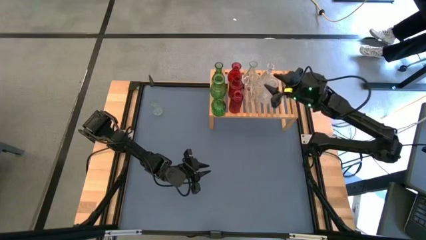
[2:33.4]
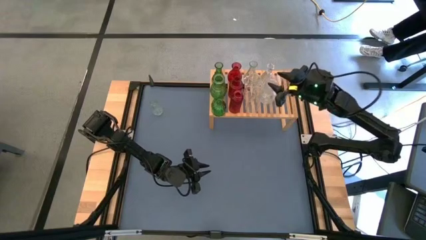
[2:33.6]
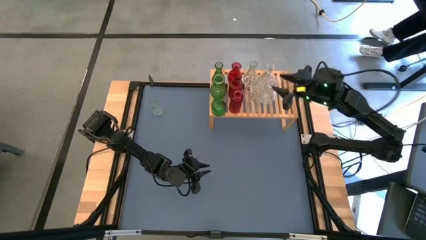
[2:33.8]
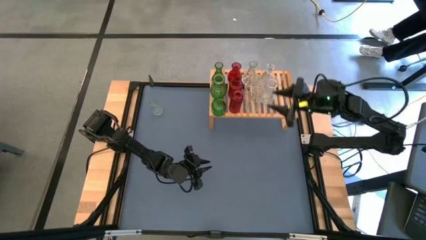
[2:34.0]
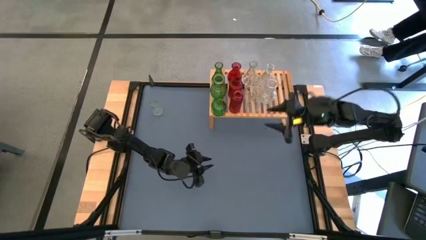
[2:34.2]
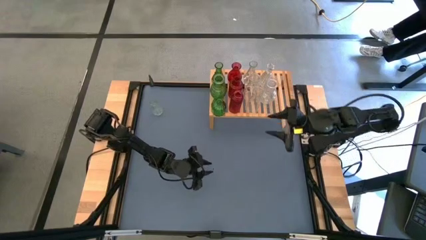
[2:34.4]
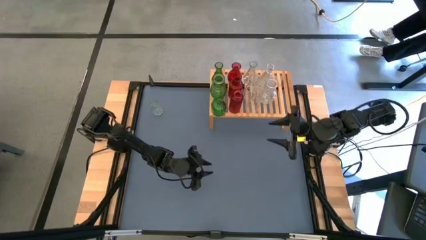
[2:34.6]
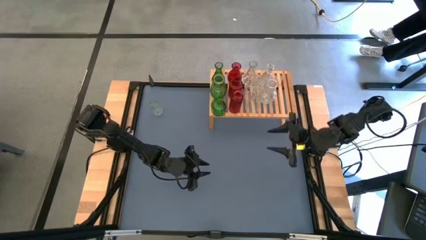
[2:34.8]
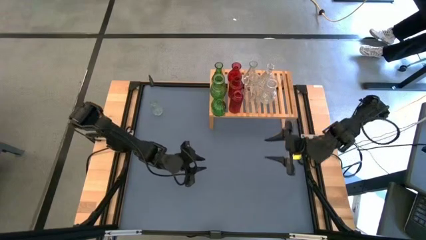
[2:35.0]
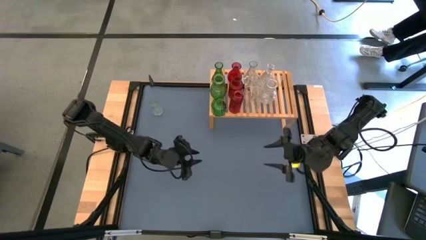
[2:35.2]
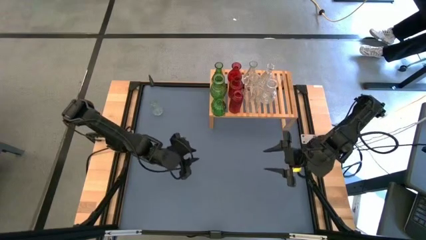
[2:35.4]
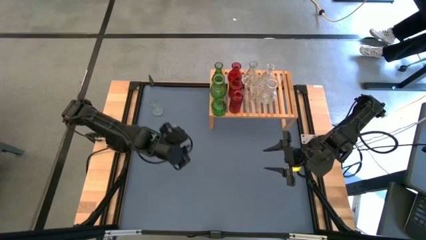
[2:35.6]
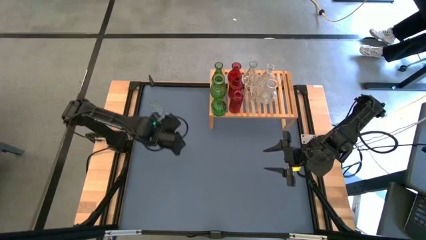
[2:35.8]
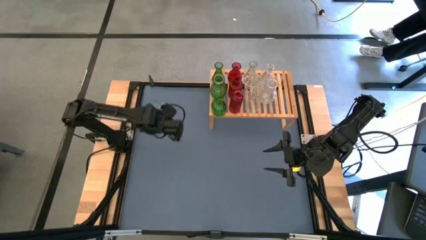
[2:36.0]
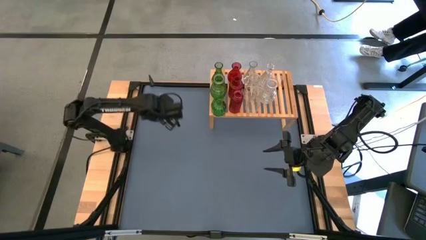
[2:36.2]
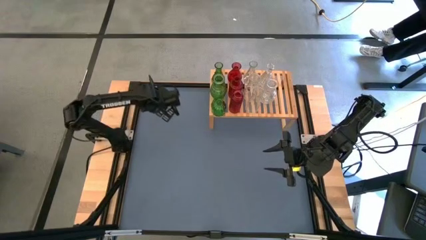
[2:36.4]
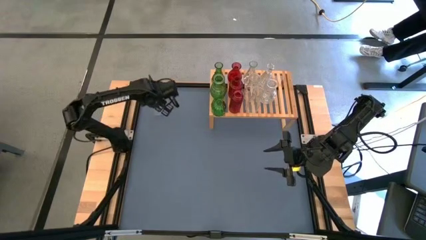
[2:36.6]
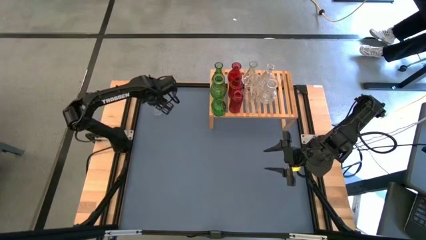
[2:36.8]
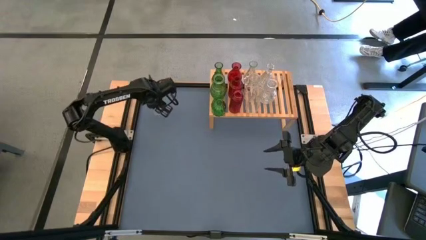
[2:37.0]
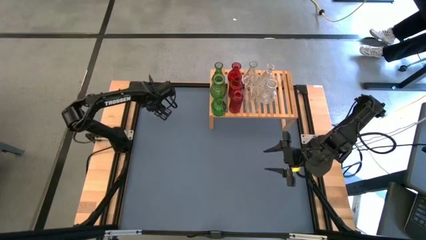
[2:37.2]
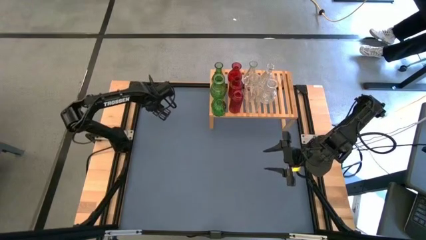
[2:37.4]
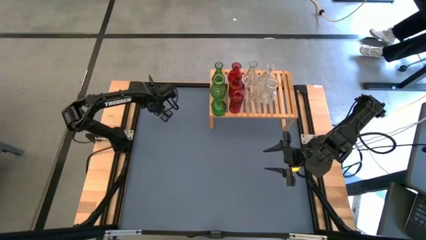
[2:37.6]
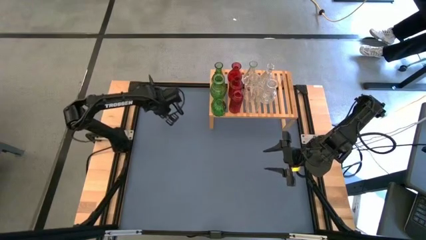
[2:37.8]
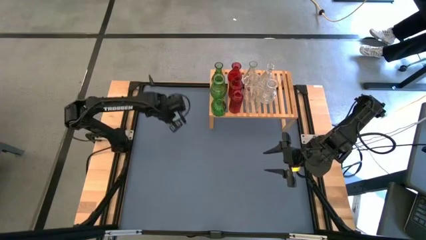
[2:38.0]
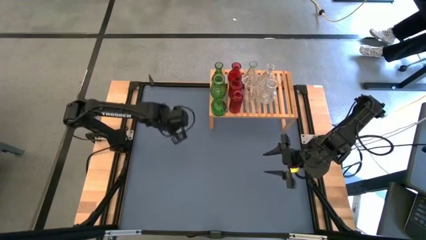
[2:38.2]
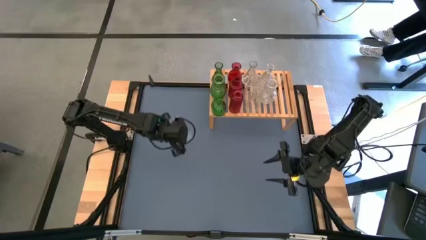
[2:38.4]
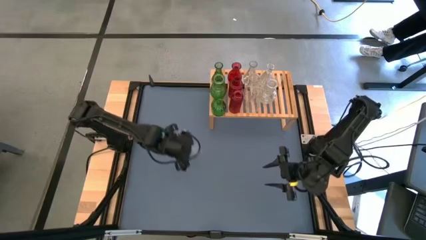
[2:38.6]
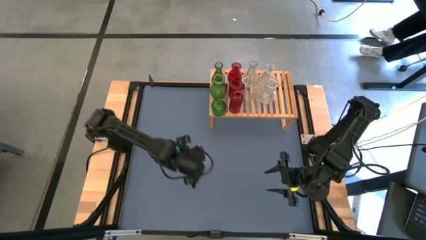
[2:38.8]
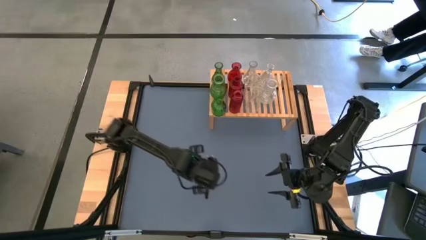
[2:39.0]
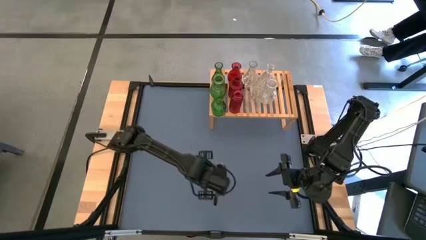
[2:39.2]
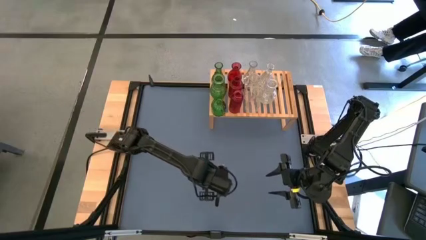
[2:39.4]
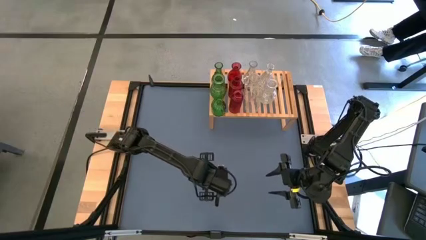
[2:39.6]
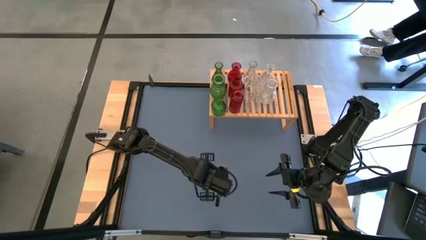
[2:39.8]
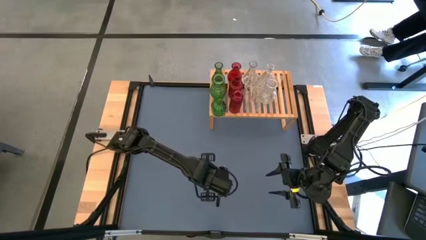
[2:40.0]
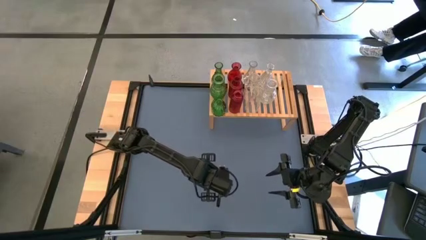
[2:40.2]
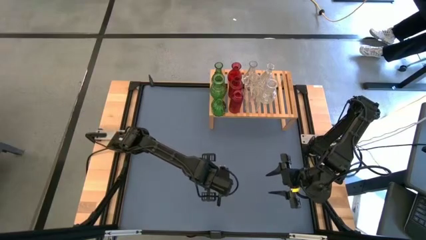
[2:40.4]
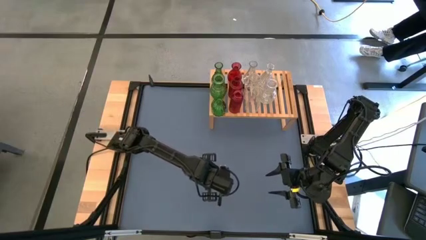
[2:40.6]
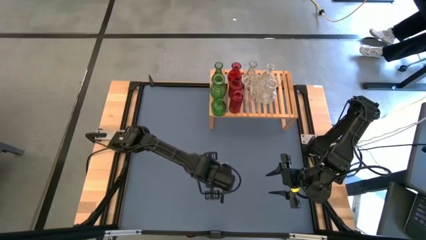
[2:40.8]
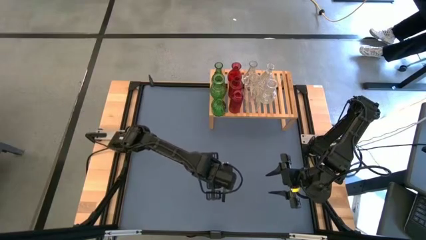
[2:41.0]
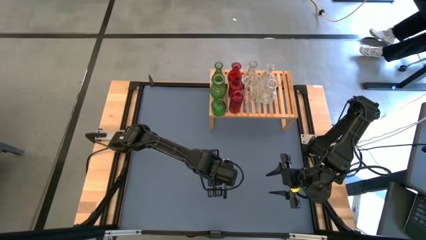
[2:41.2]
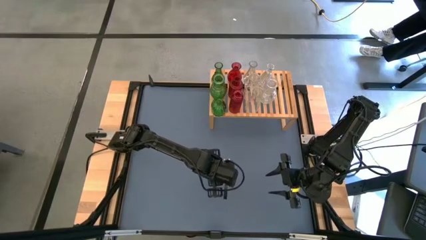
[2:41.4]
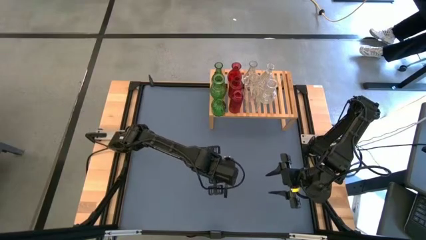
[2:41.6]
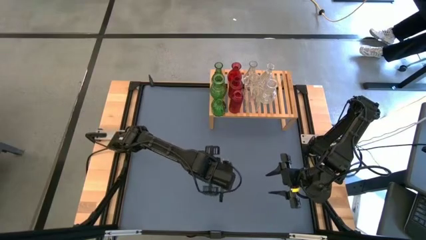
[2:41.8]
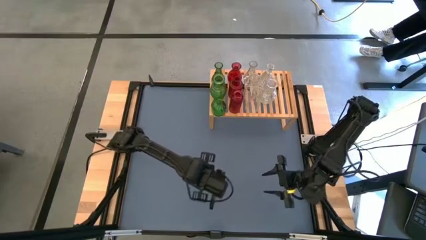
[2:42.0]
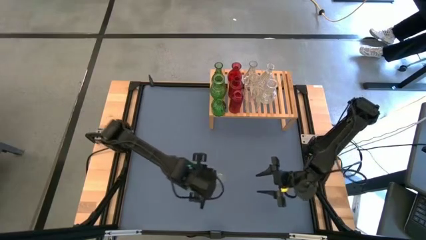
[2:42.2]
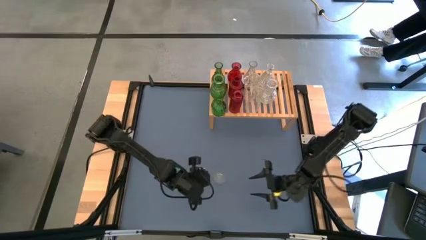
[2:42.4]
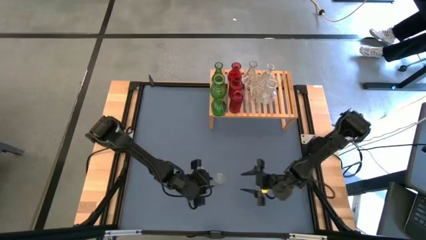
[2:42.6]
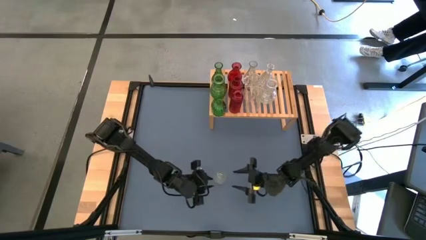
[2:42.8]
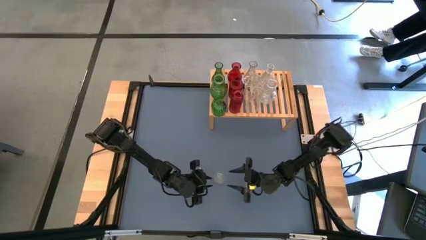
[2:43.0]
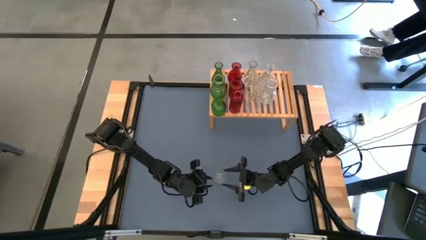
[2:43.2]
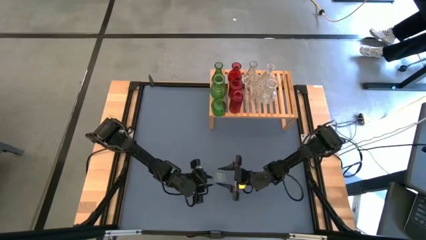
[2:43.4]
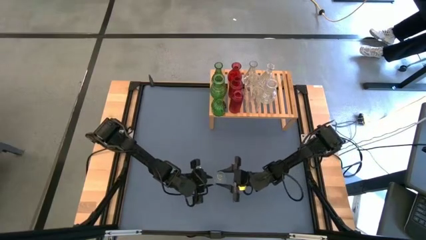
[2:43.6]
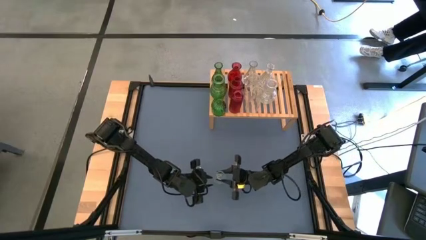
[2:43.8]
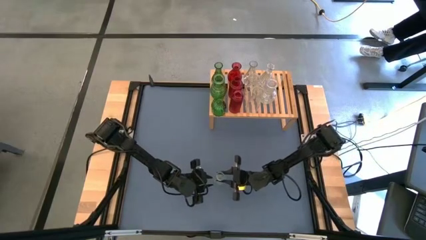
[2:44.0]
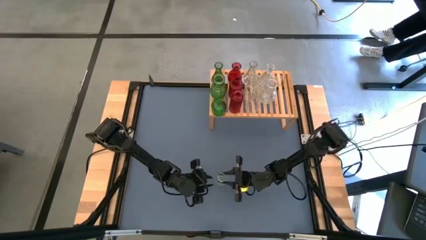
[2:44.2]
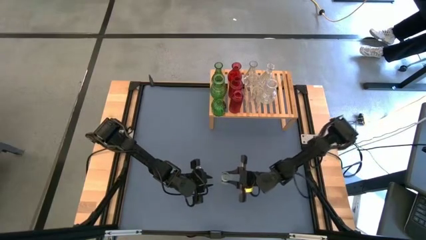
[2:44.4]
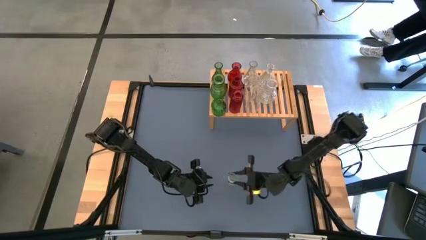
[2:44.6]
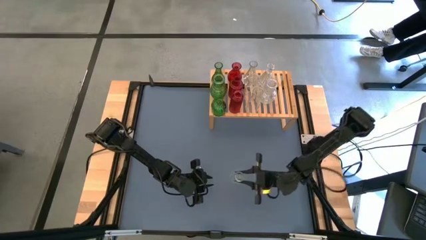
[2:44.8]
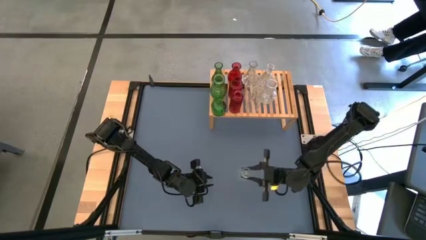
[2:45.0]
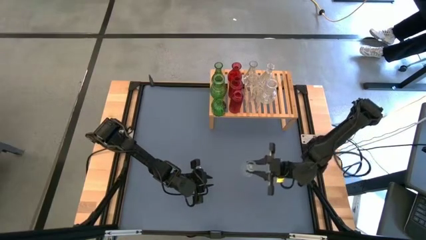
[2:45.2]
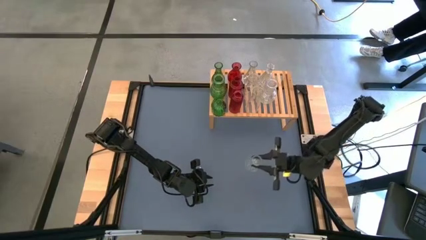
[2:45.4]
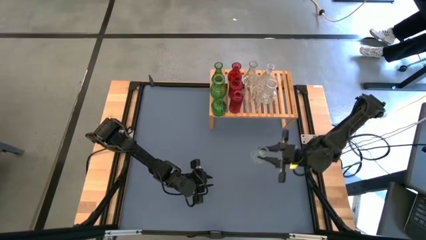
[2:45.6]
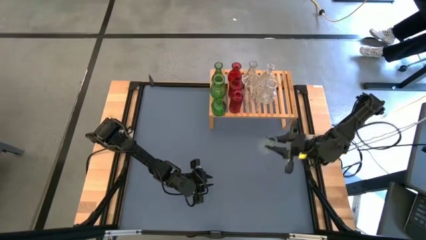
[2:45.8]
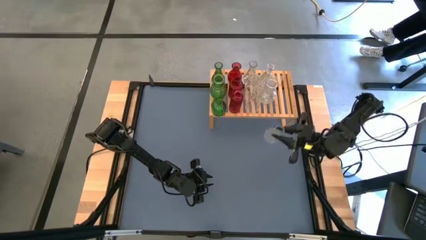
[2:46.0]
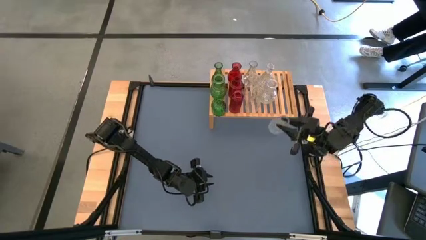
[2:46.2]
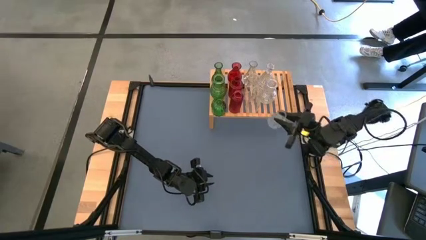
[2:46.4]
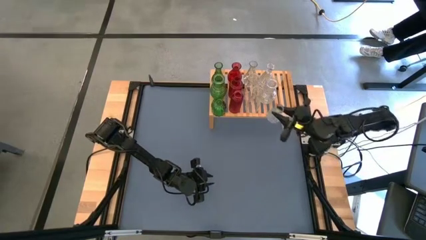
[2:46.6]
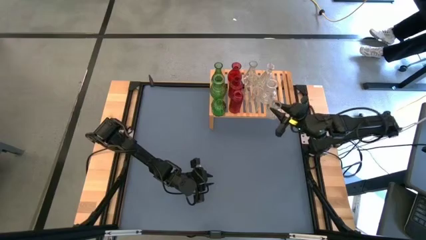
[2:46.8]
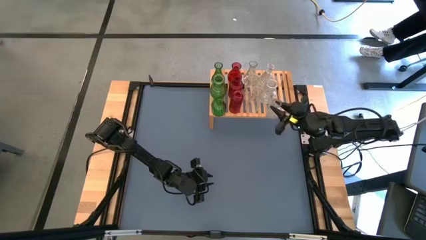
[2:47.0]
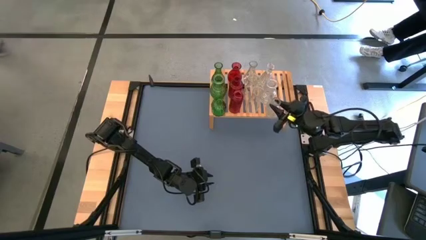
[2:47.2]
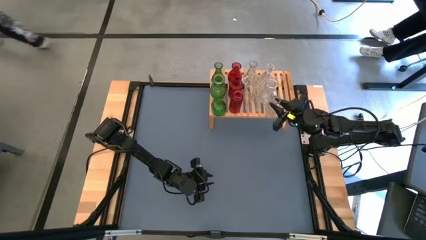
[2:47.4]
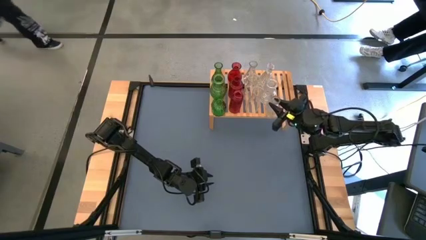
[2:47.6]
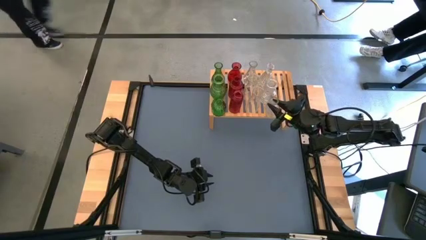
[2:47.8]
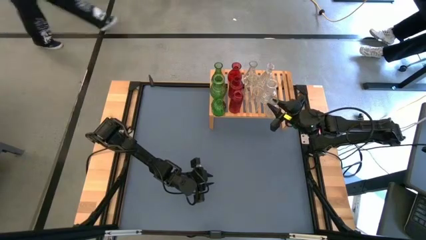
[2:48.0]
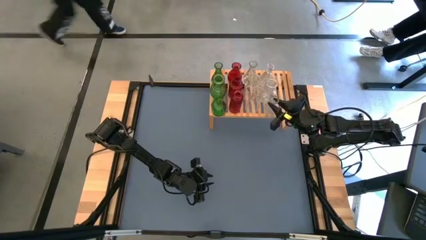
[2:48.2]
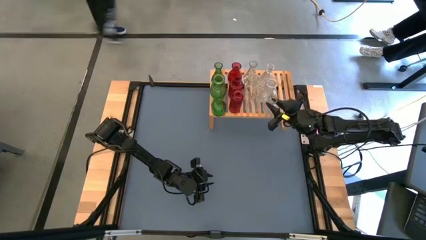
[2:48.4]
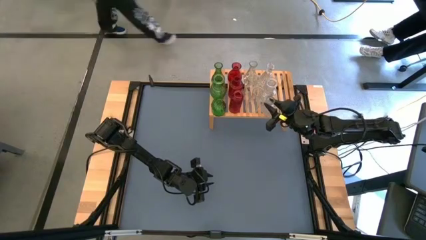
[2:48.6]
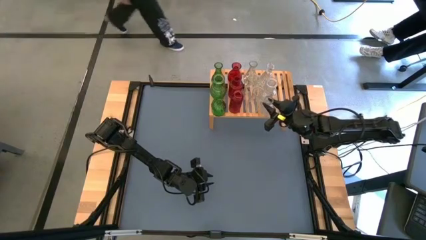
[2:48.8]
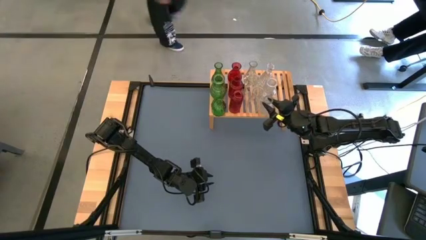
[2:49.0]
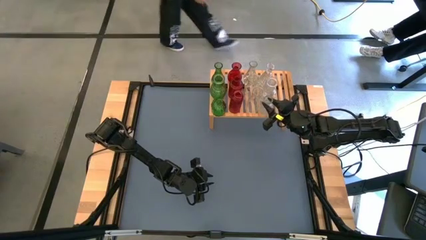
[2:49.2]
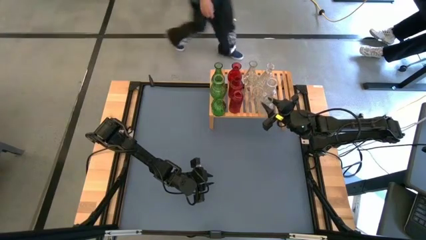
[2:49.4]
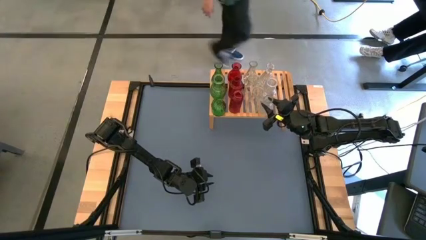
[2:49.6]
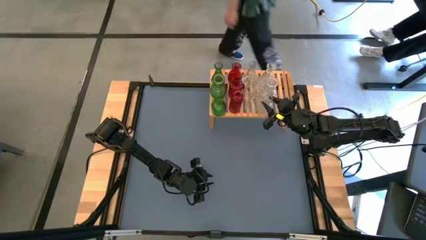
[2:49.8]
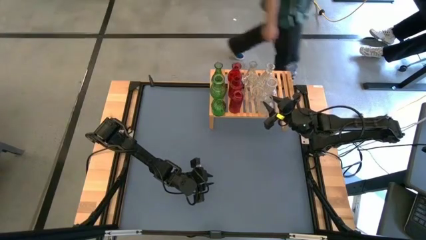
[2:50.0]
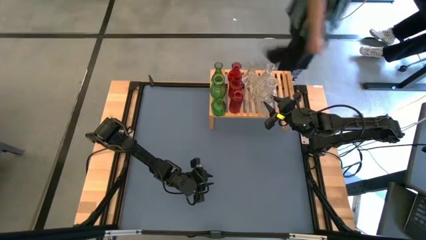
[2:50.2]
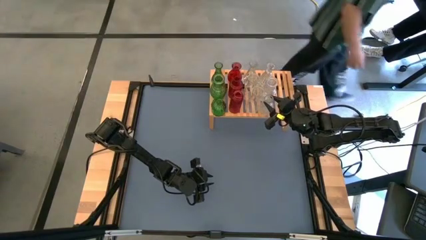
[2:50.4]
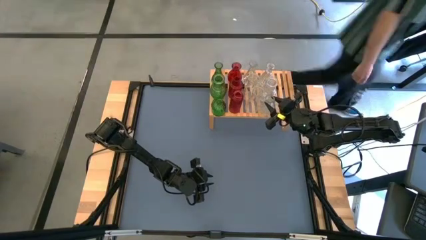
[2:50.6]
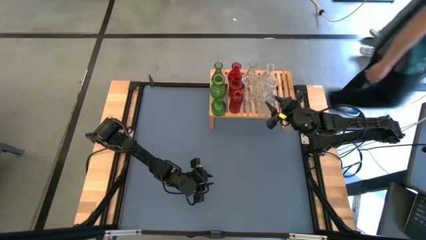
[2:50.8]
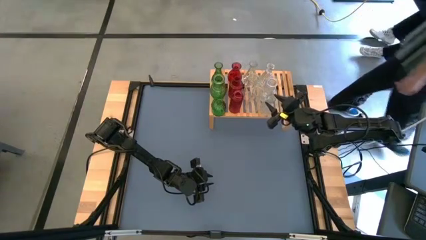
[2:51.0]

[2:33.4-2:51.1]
Task: sort vases onto shelf
Put the transparent vase on the shelf, aligned with the other transparent vases
